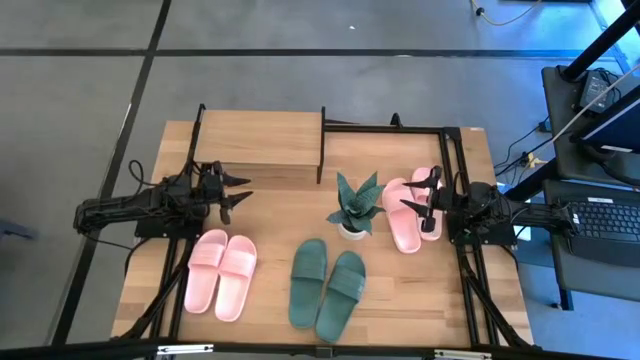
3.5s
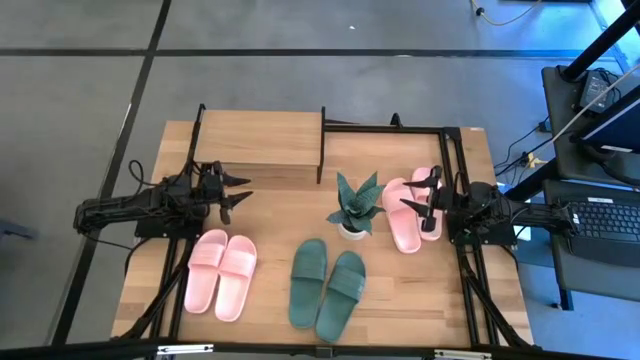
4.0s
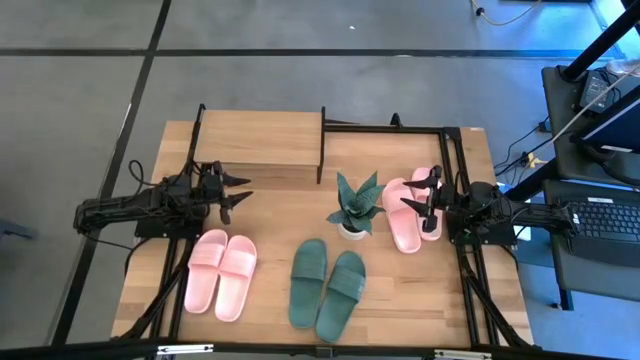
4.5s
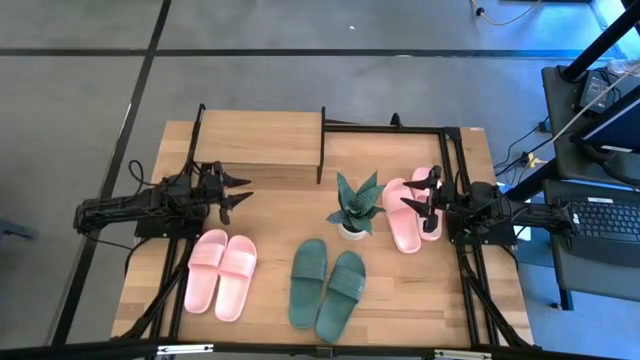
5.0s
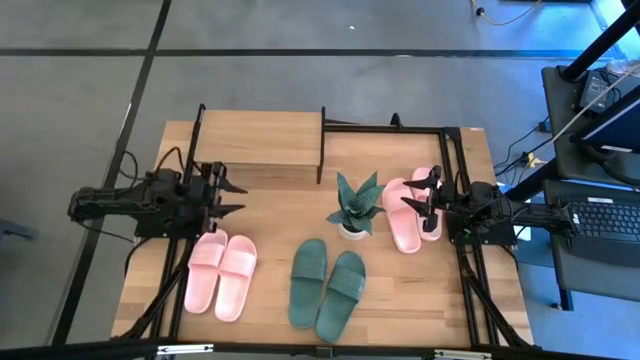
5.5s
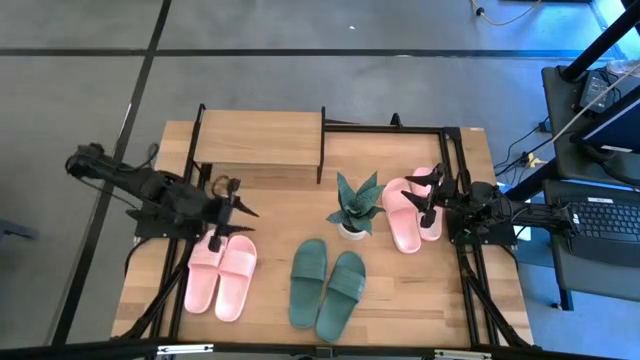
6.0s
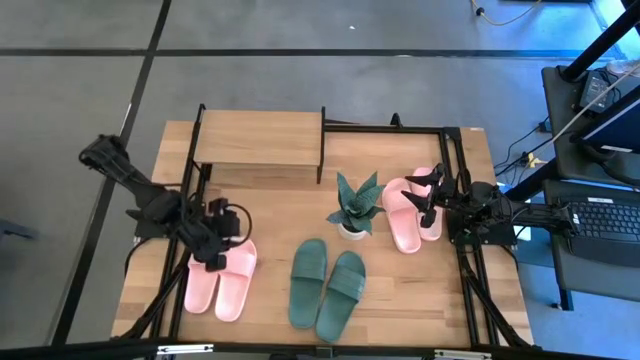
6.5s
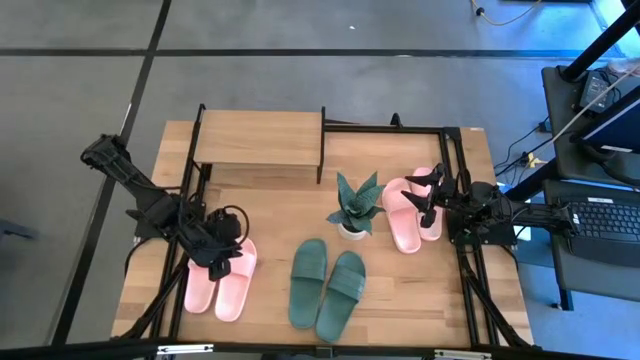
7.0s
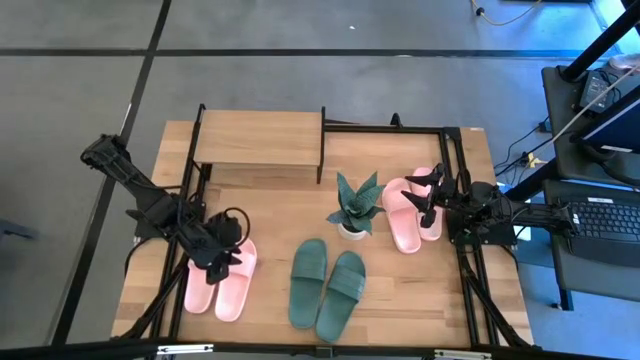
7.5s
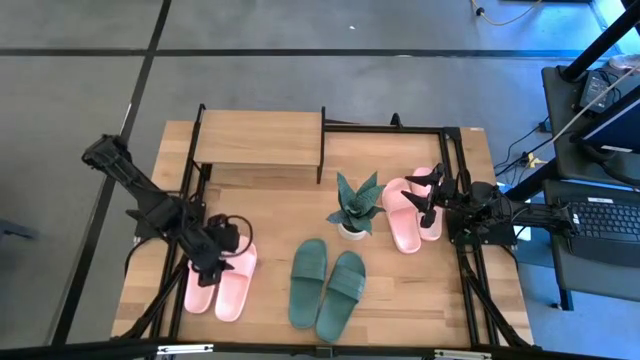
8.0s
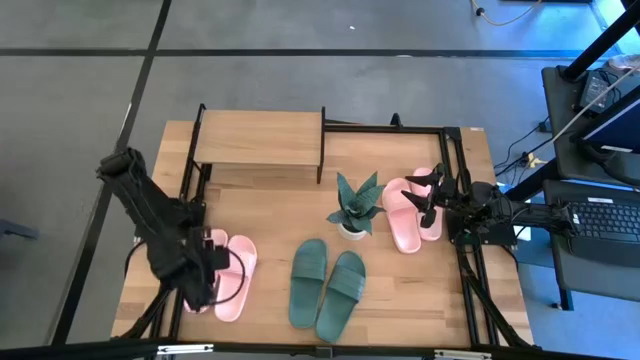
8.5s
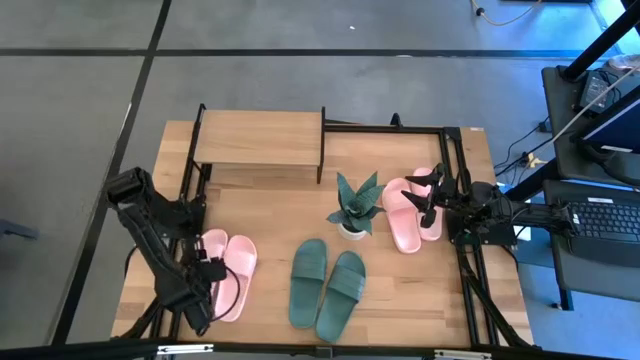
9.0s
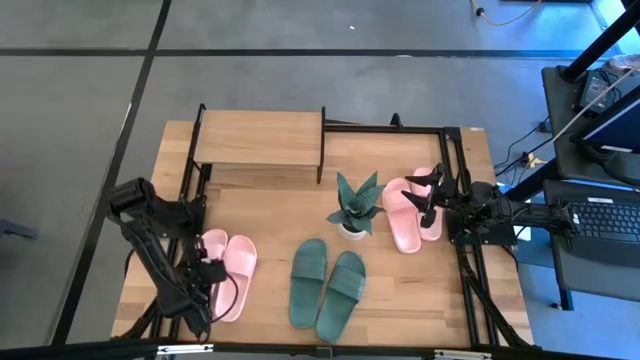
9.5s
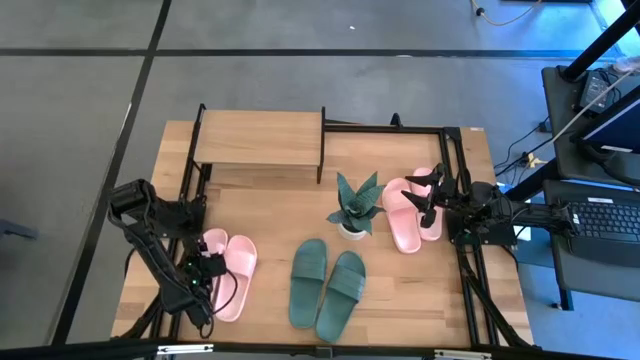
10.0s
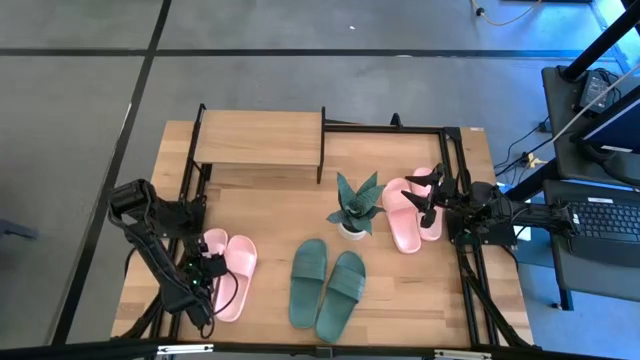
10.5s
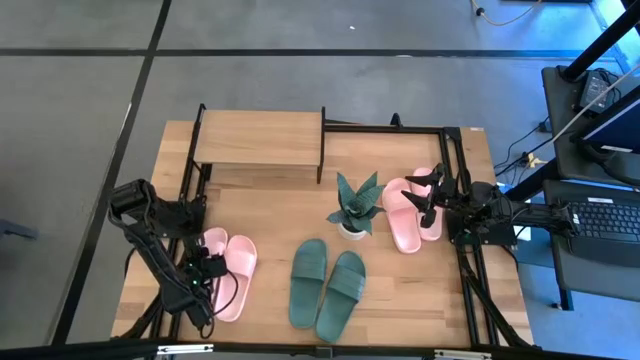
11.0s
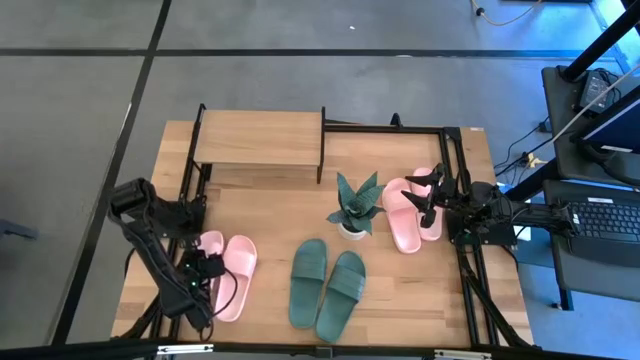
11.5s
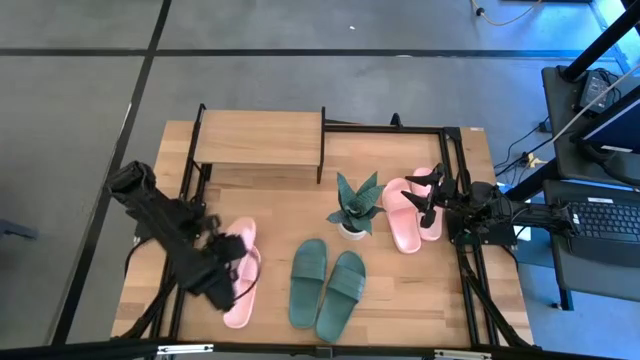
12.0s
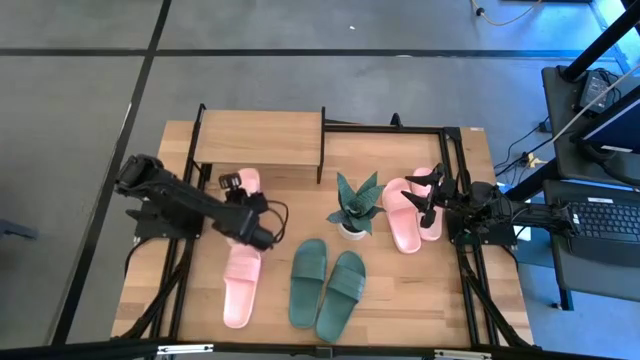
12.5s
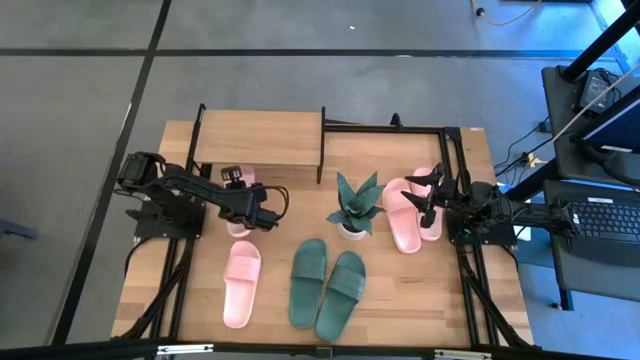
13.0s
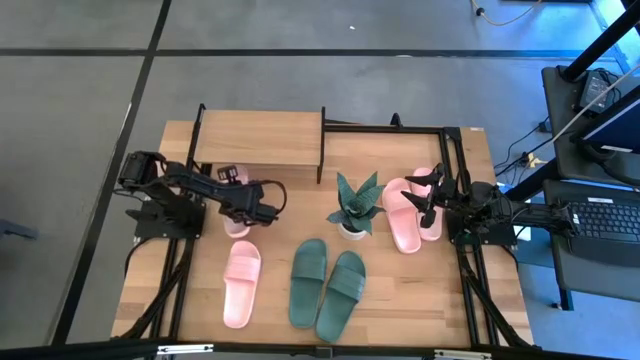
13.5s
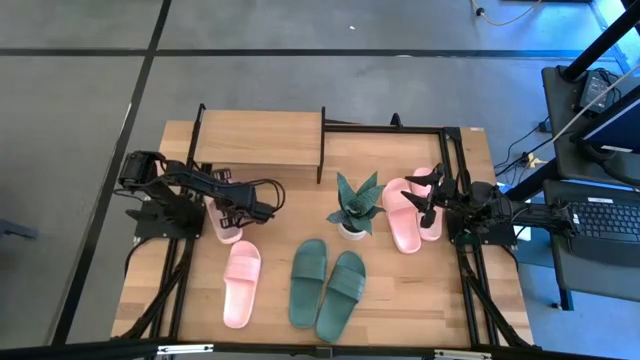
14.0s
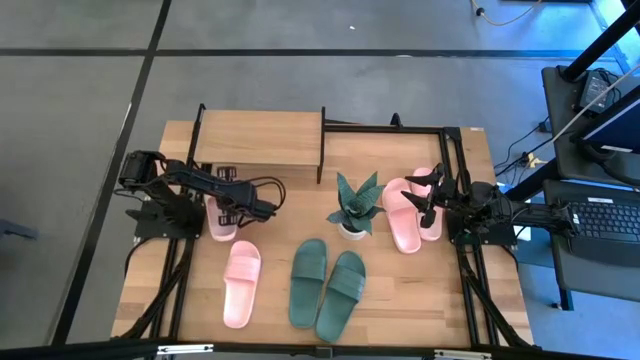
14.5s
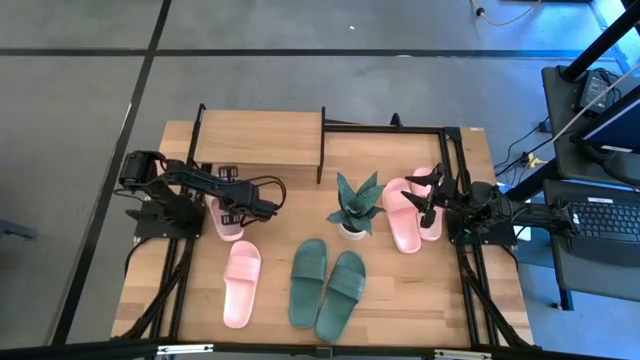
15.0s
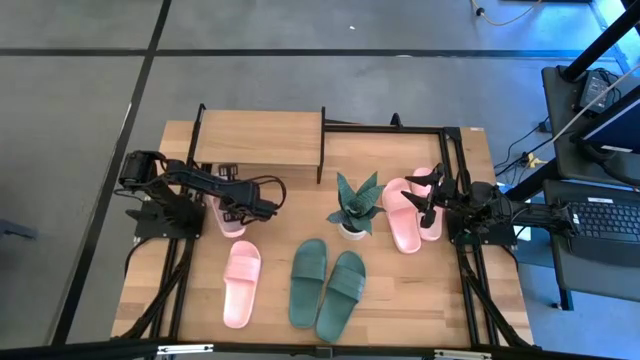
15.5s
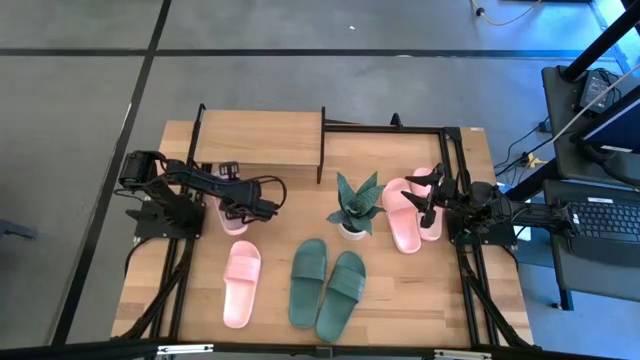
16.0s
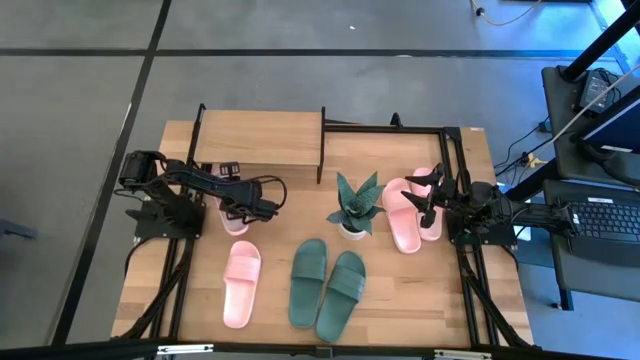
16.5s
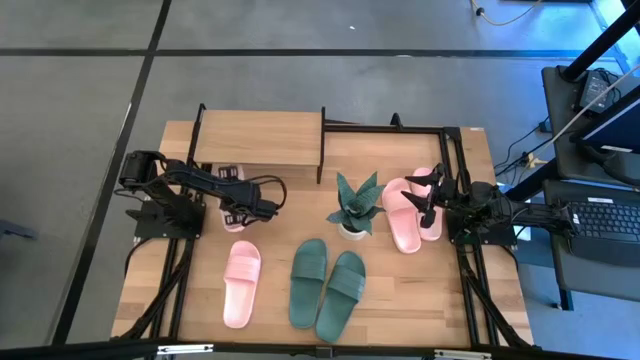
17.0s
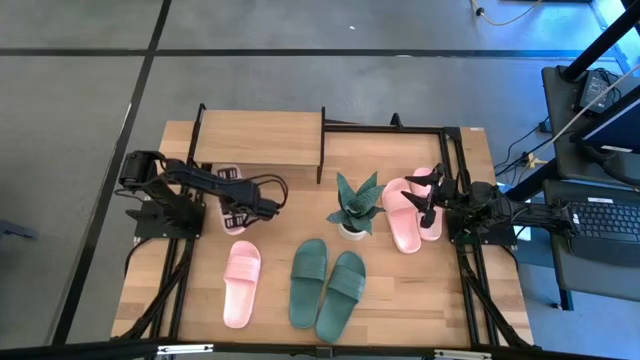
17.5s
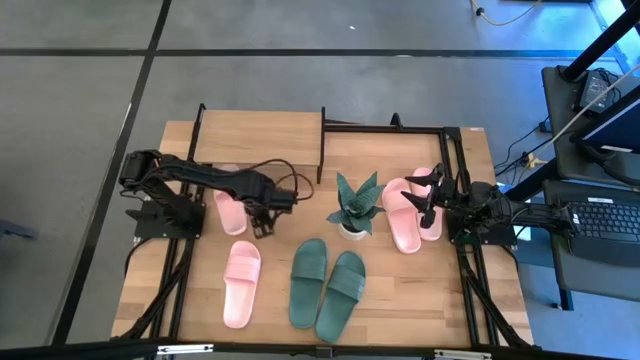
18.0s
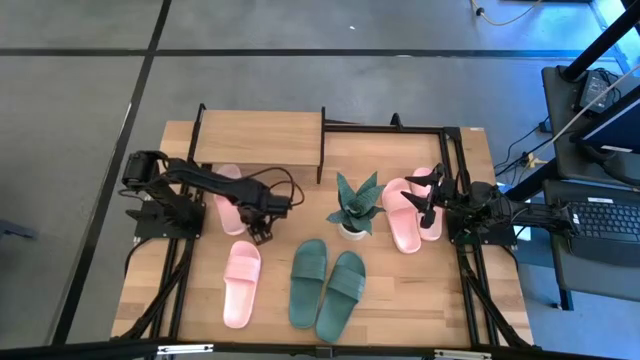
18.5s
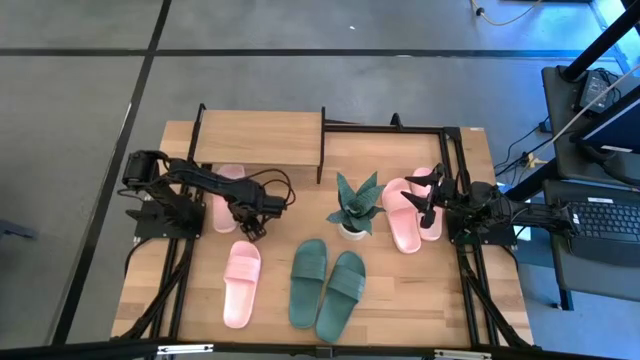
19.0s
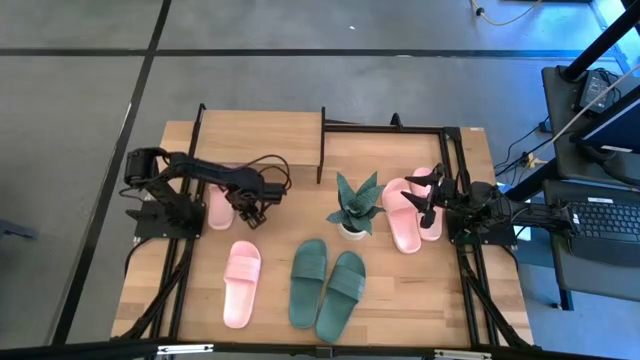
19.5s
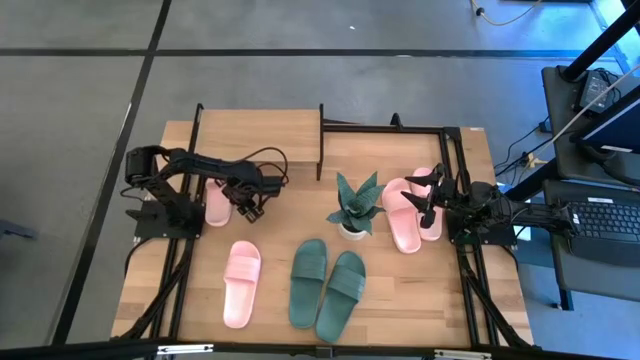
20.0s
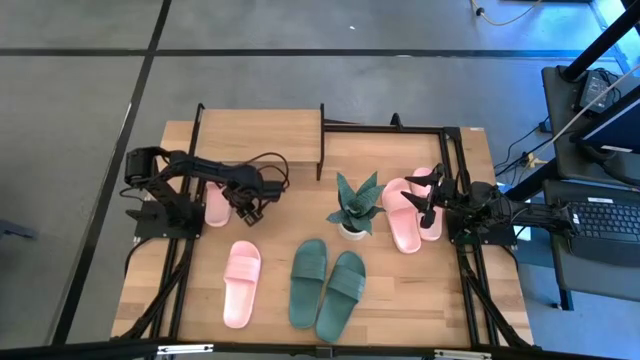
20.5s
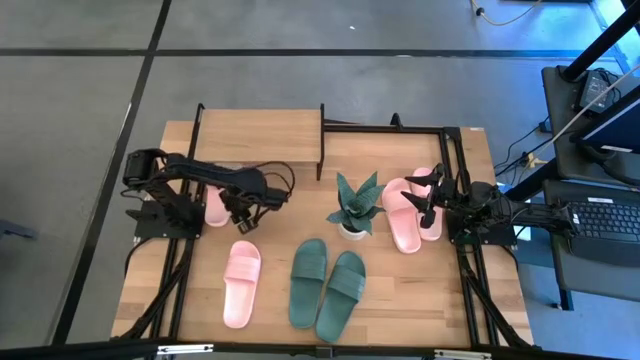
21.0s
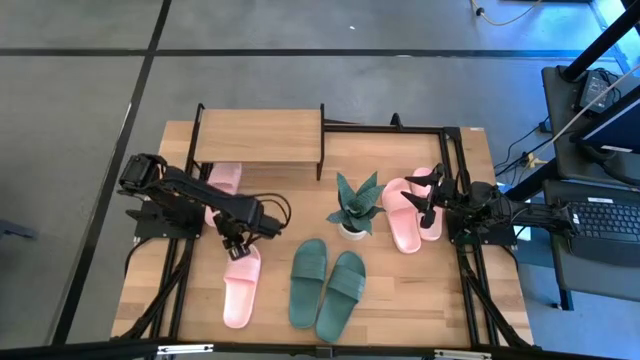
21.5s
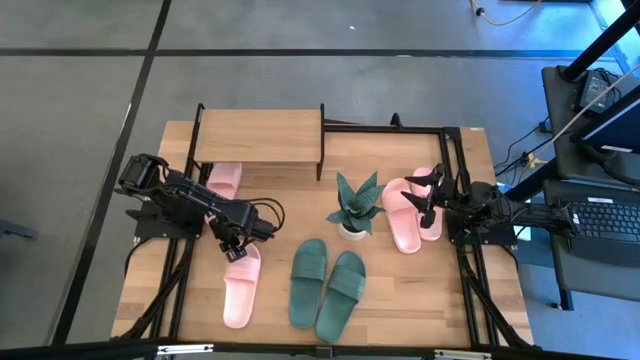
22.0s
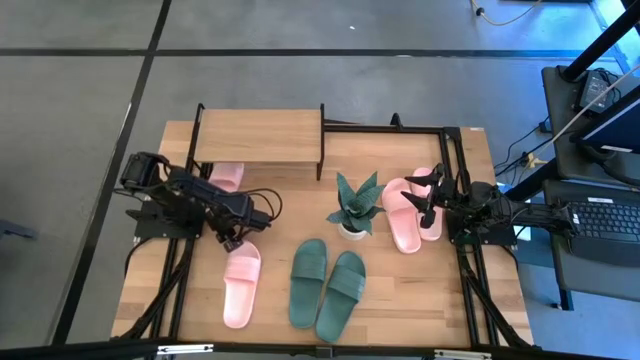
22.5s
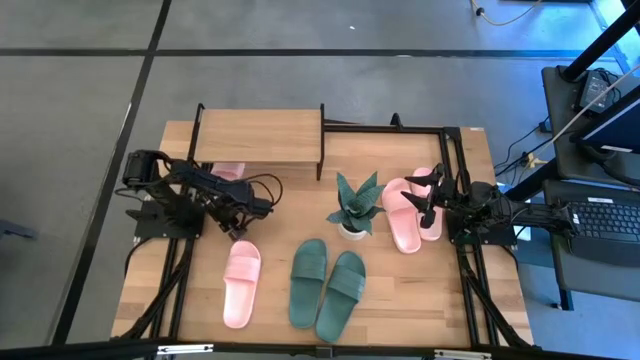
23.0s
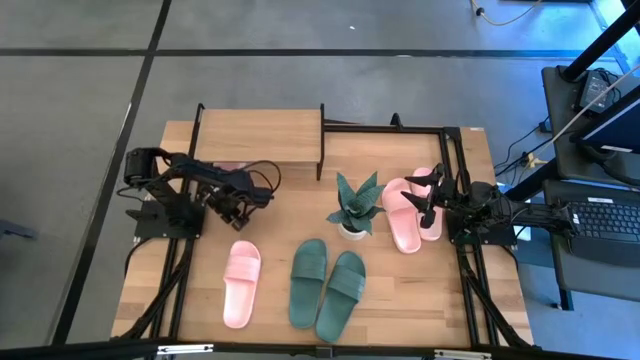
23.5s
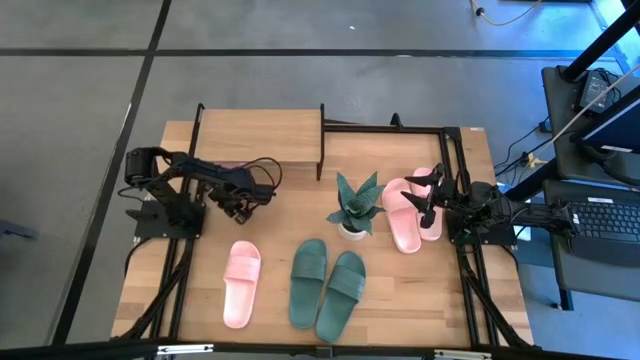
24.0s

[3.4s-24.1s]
Task: Pick and place slides into the shelf
Put the pink slipper under the shelf
